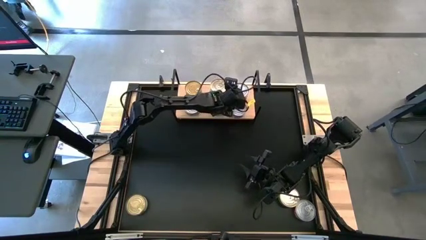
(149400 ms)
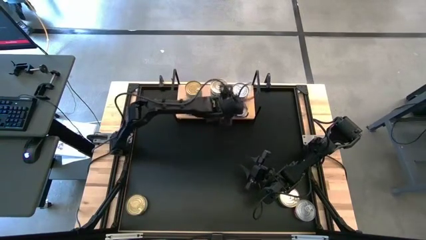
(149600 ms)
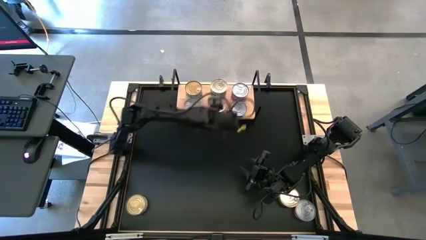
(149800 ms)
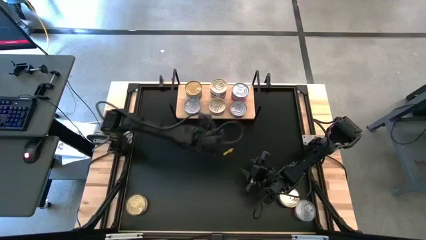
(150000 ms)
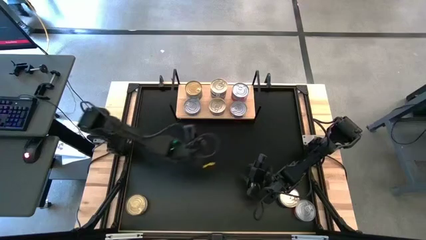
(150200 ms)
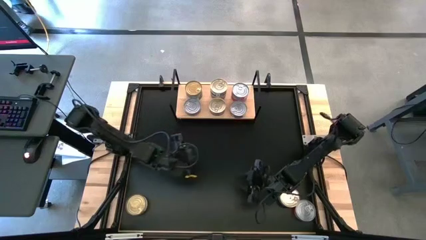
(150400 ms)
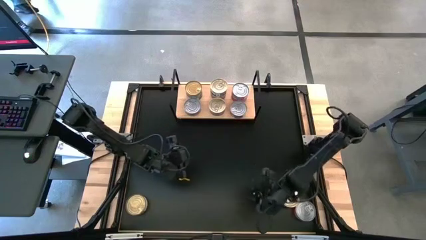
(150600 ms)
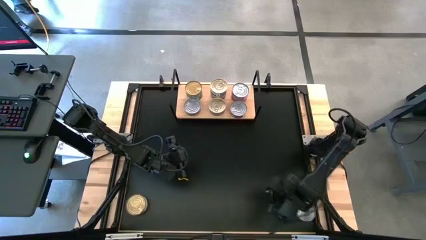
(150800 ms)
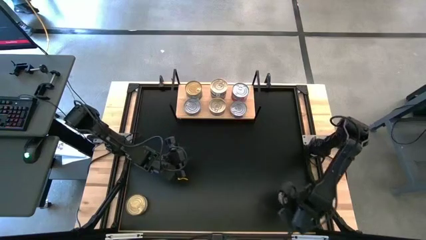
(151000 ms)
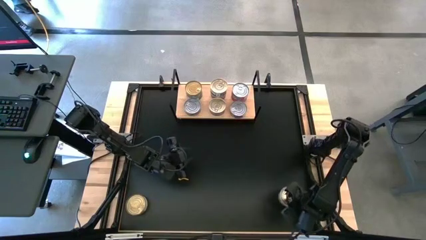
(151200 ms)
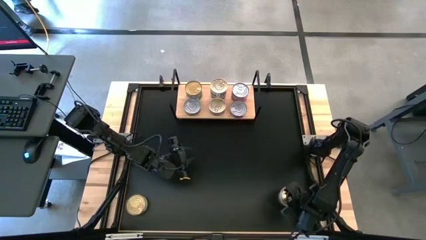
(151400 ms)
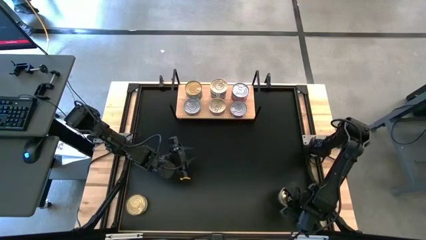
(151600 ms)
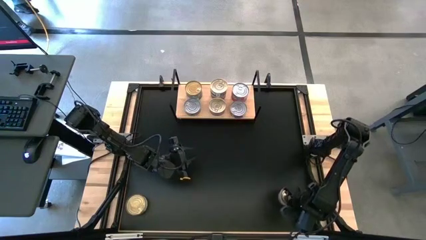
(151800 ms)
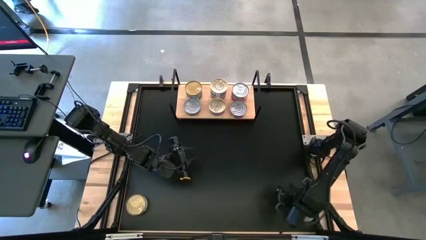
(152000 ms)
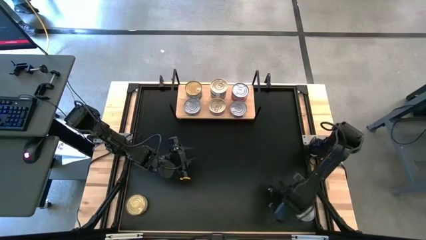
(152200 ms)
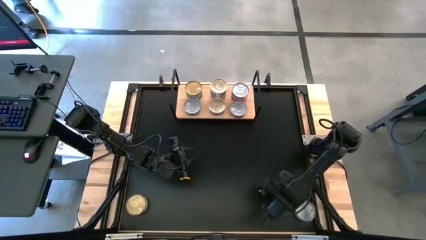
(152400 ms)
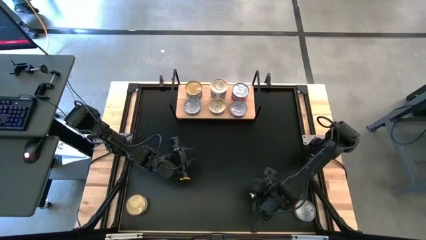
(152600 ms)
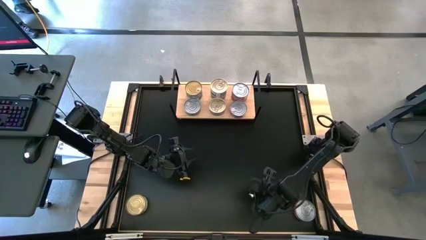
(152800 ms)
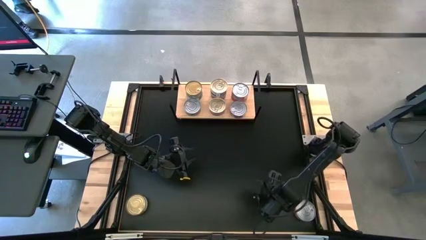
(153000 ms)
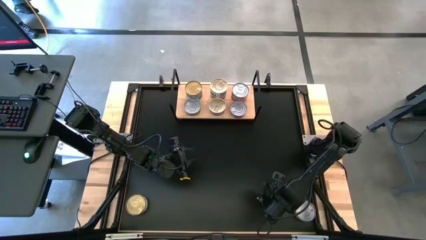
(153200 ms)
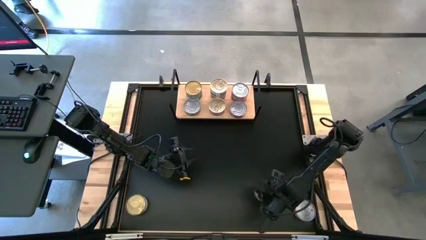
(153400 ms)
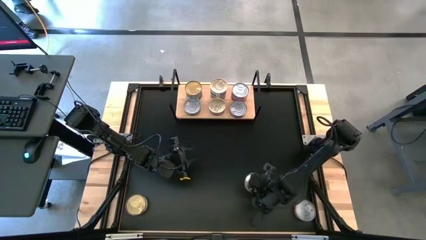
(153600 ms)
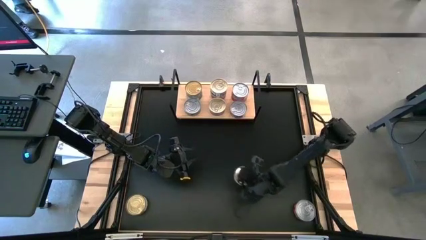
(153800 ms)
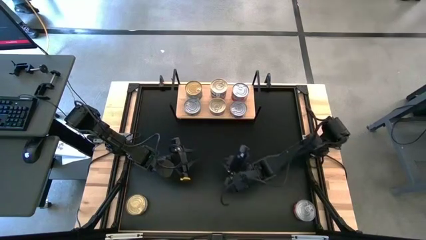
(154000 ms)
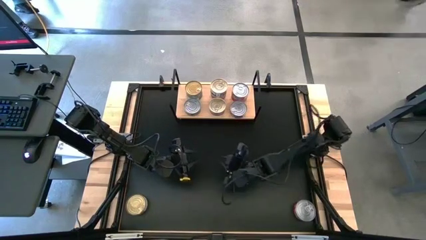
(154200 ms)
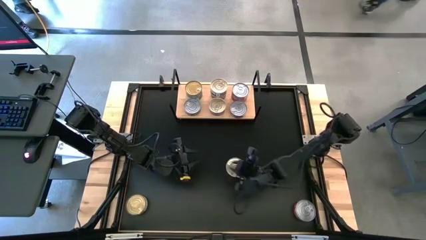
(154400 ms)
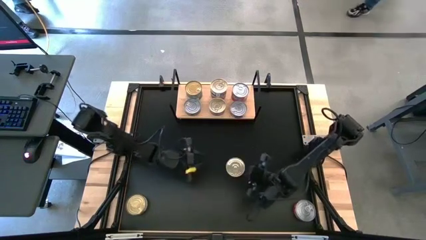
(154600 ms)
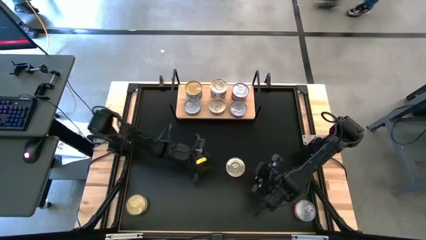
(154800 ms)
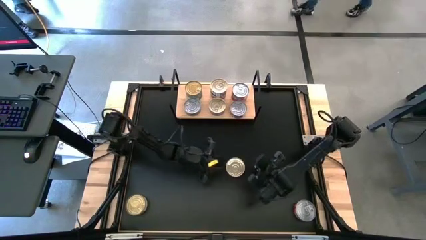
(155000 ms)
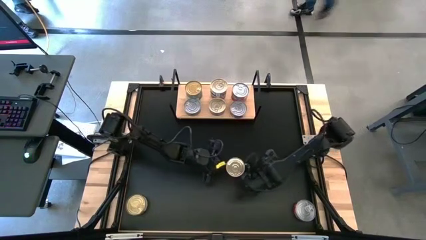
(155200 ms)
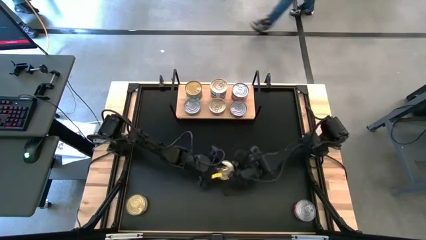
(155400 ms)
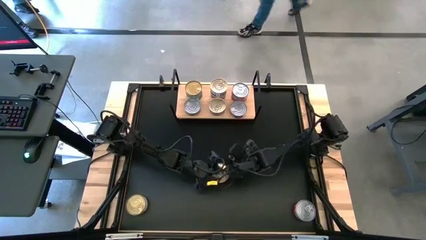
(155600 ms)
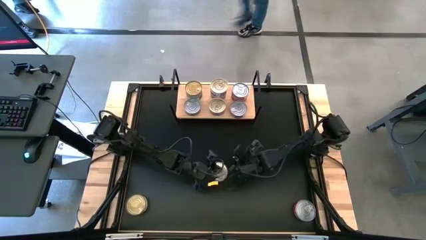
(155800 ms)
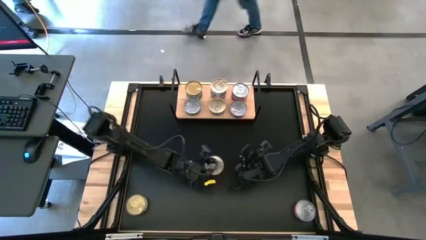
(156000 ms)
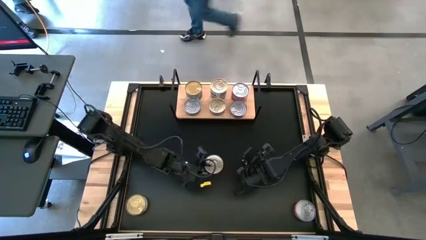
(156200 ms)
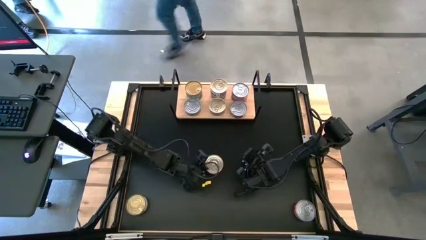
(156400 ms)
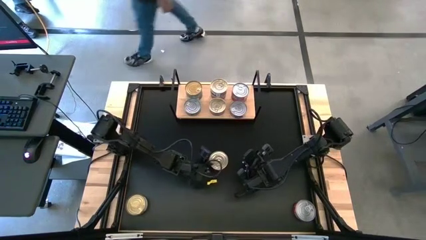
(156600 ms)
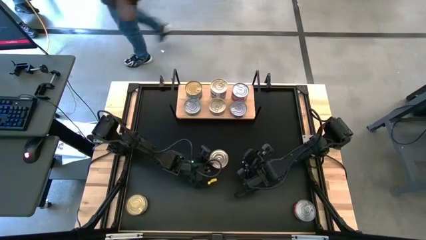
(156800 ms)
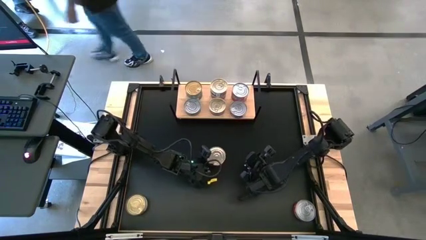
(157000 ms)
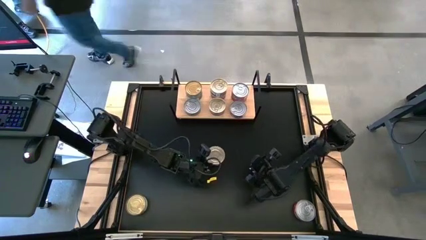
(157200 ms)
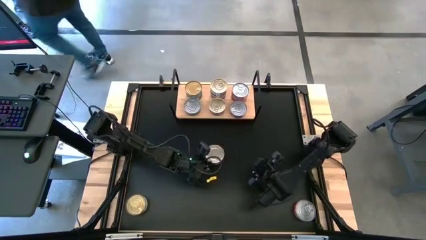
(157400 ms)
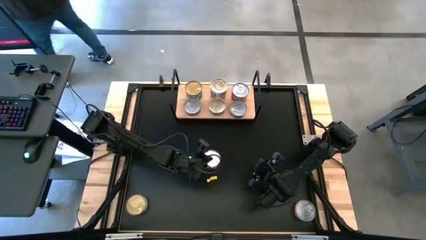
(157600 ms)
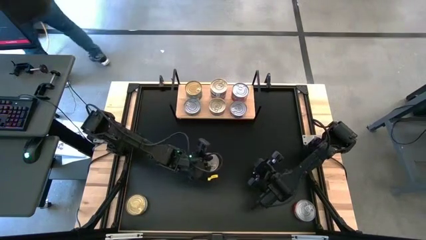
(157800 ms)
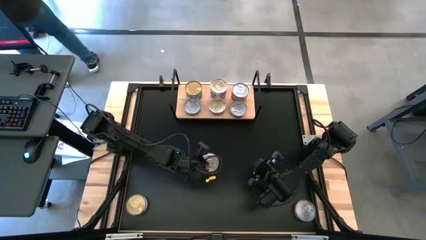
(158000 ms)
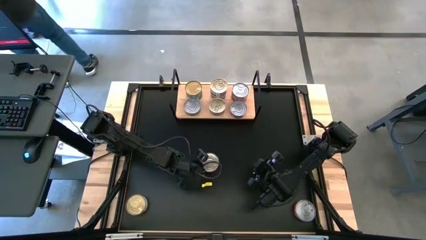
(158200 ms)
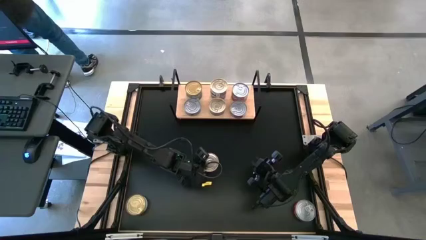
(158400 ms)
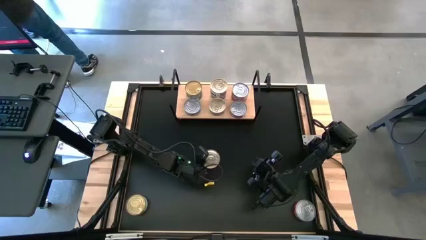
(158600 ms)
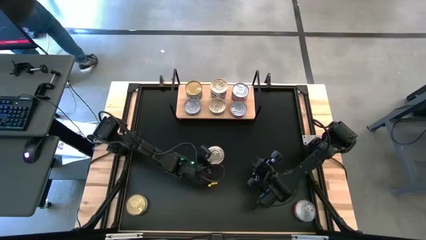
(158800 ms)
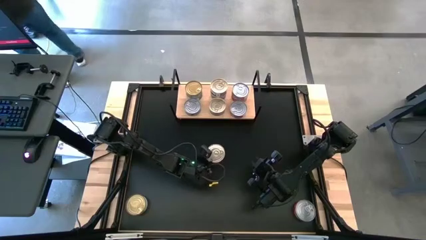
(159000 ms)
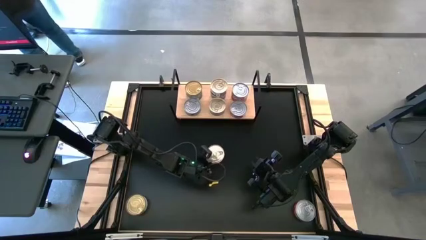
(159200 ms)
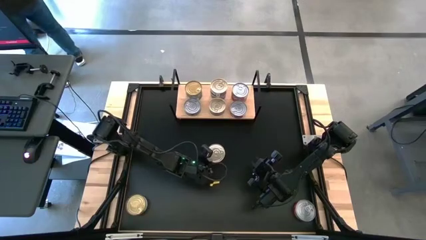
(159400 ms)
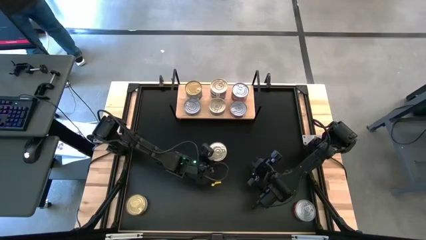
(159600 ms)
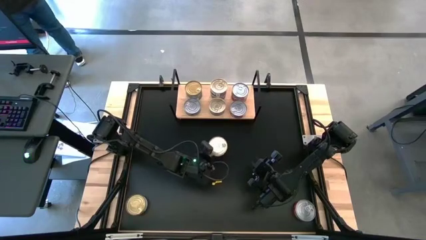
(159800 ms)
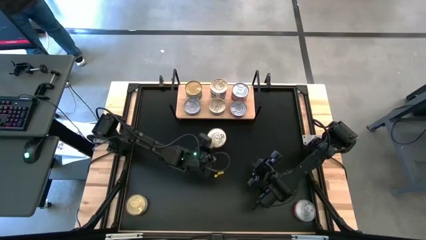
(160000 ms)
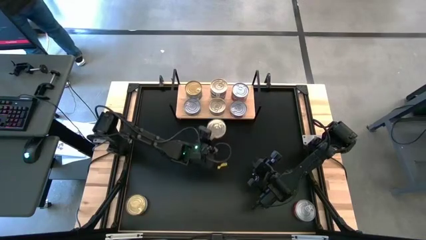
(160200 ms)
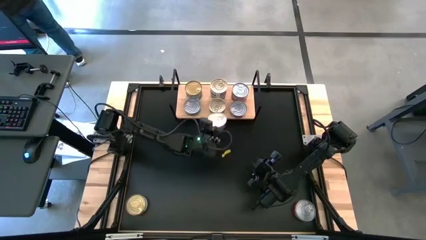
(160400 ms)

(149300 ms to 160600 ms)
Task: Stack canned seafood by type on shelf
Stack the blue-tuna can on top of the blue-pink tuna can on the shelf

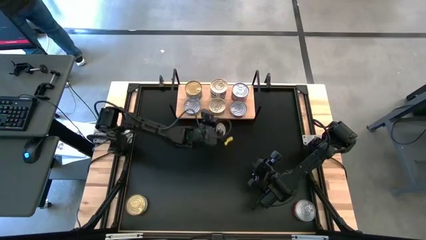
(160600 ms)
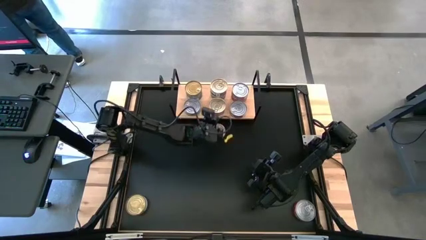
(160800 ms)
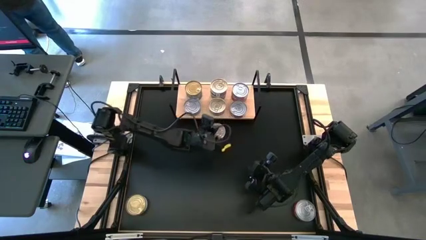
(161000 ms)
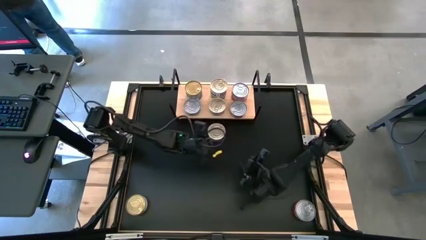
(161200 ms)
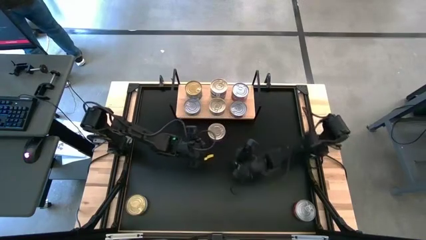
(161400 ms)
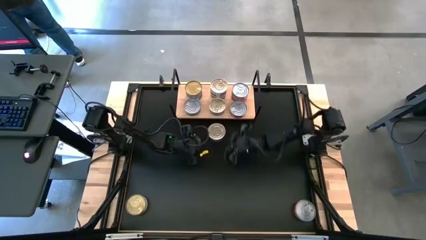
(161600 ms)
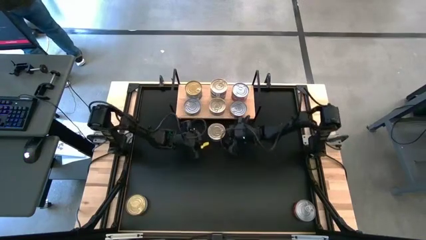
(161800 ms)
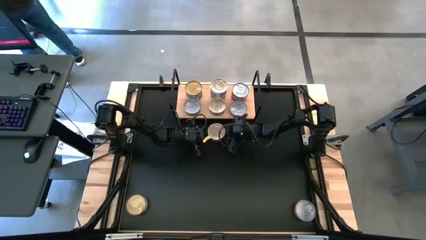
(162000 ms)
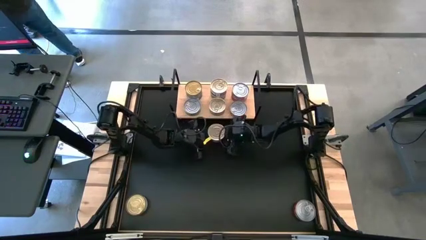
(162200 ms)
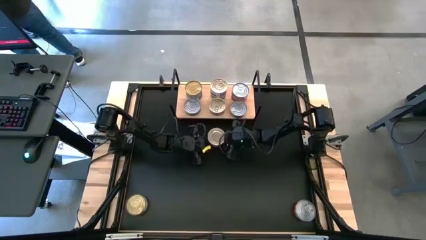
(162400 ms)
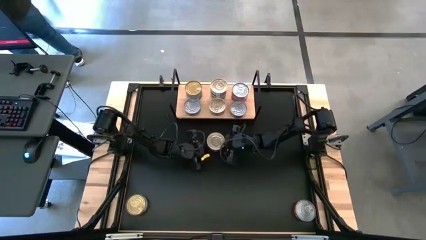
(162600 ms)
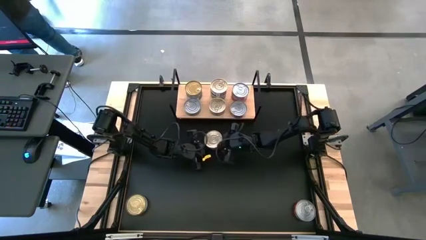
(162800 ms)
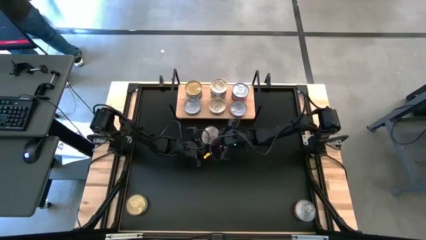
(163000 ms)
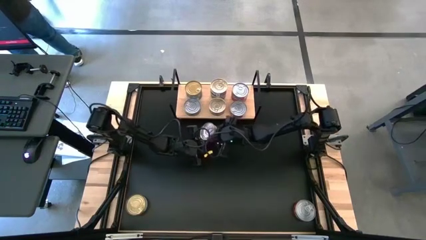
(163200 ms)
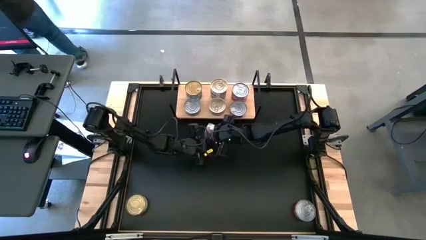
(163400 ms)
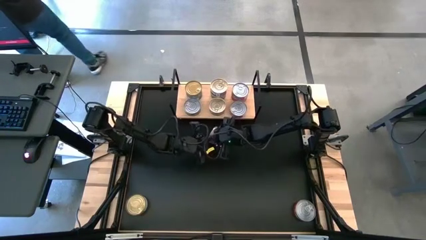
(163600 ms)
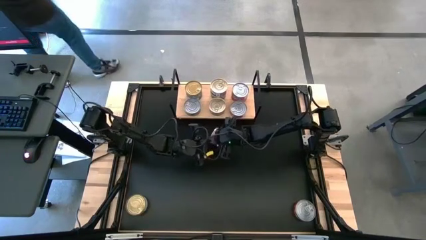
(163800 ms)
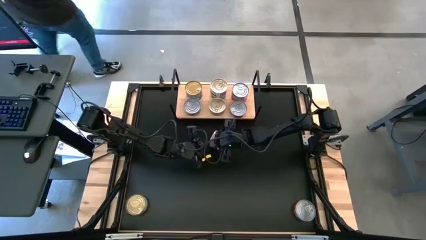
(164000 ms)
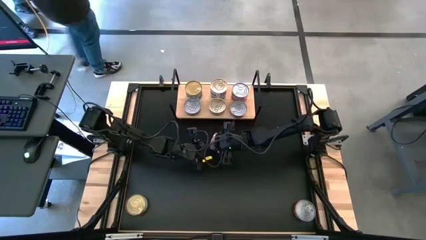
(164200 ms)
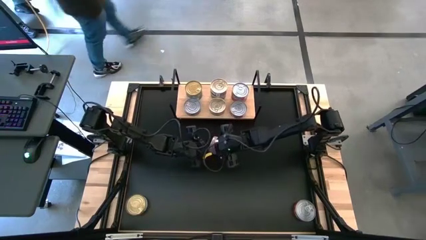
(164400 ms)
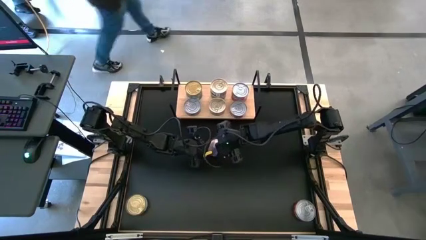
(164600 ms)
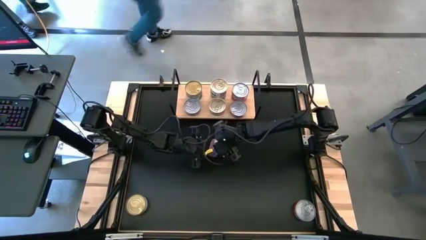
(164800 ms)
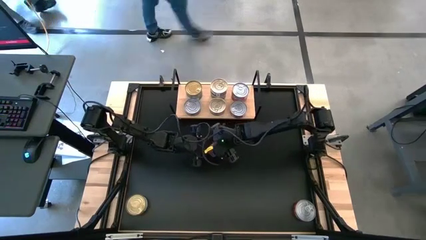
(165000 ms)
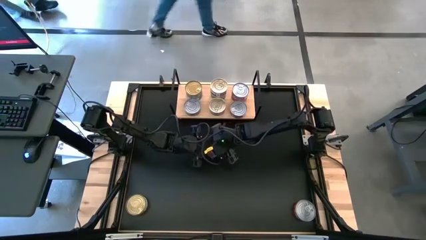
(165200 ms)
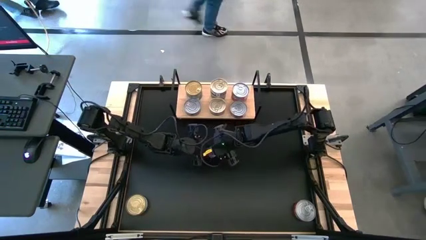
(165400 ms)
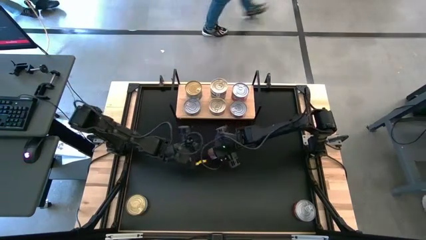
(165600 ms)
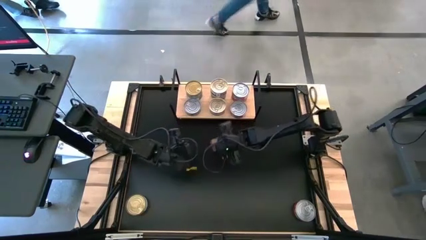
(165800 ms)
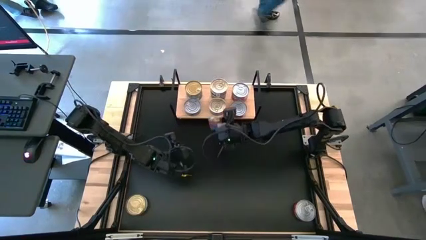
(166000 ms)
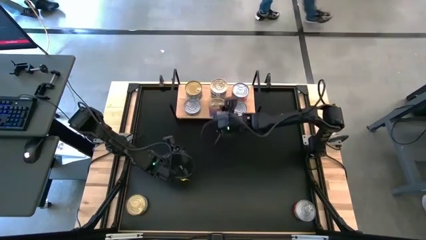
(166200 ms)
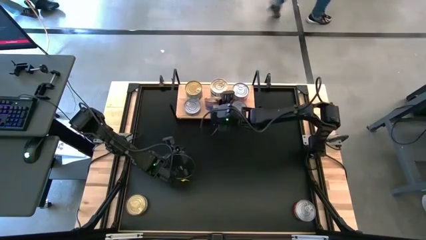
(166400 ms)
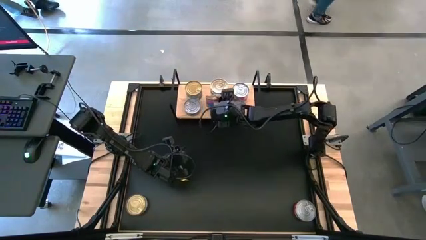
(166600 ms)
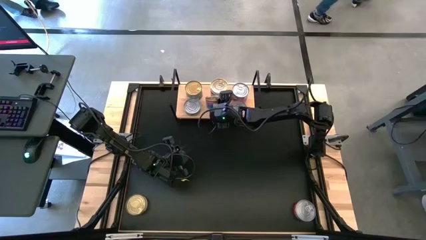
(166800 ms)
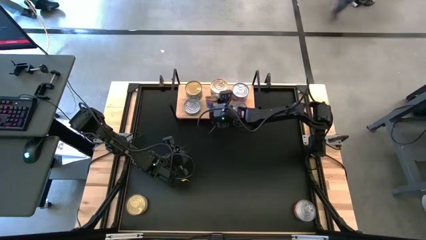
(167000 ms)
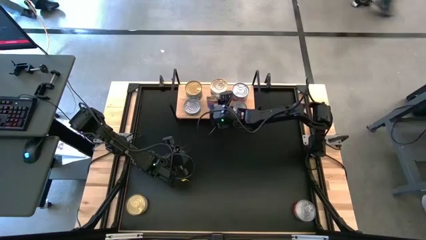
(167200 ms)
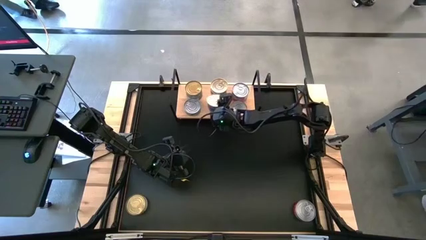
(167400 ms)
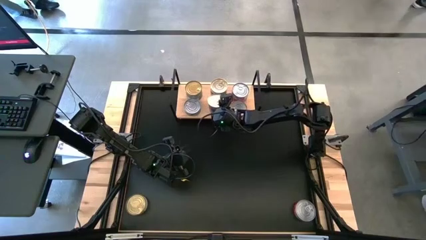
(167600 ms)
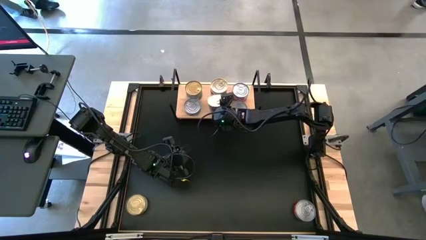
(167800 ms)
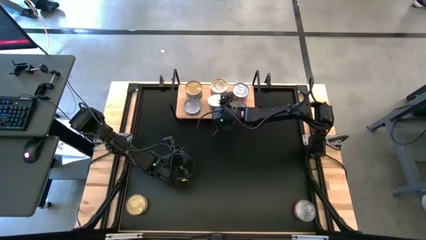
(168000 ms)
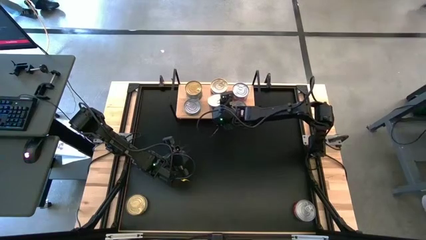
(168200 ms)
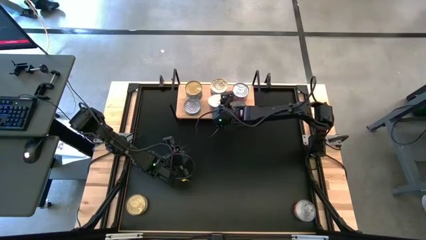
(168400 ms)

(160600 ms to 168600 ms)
Stack the blue-tuna can on top of the blue-pink tuna can on the shelf
